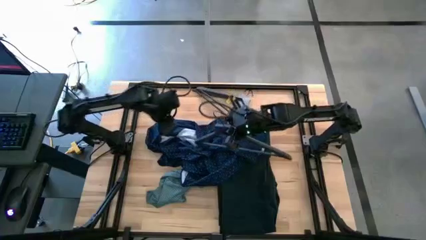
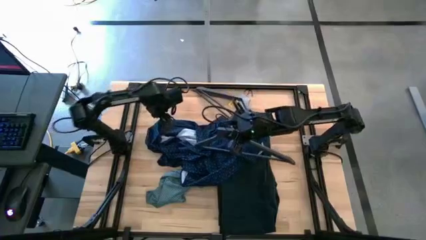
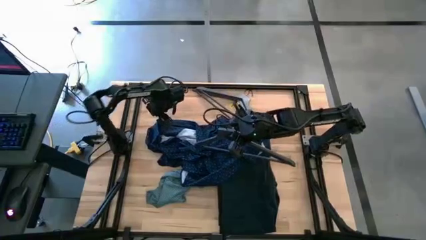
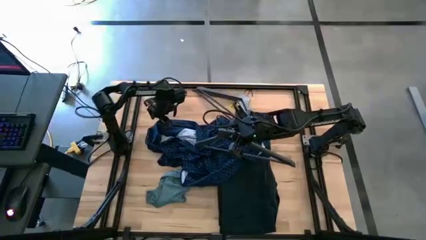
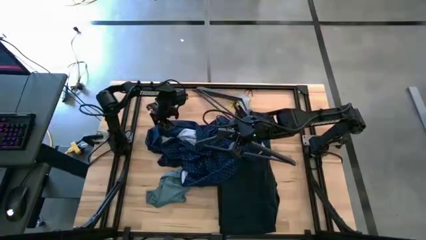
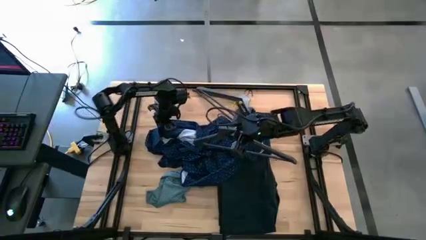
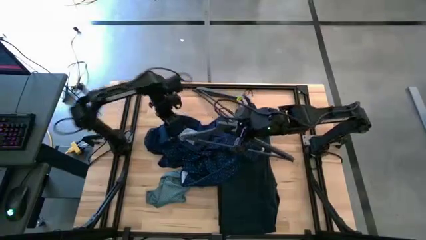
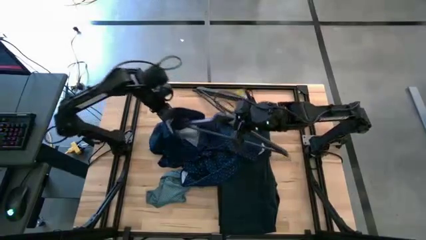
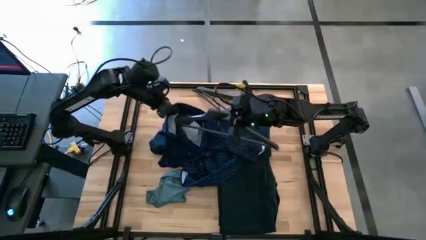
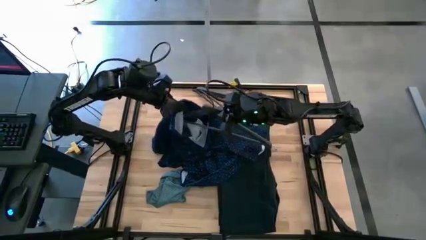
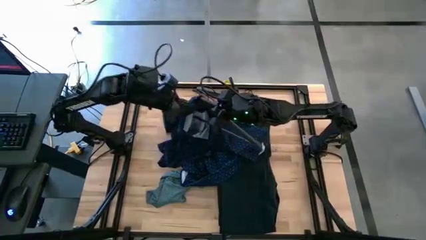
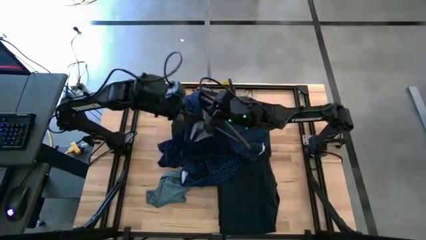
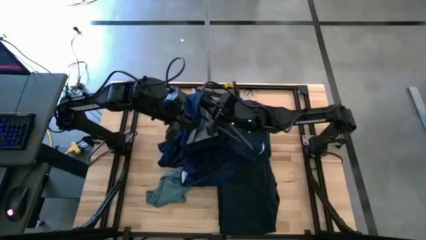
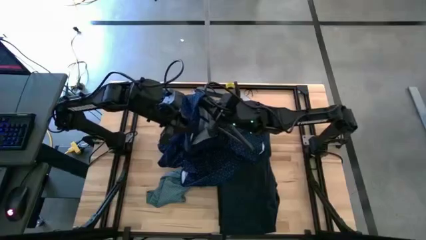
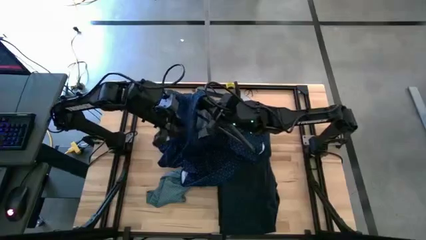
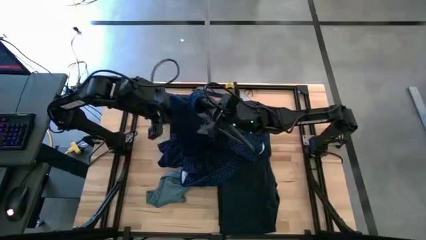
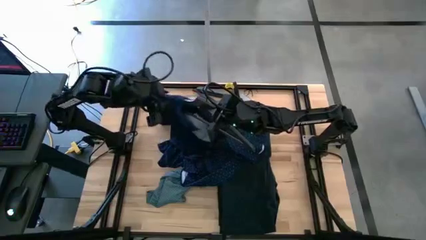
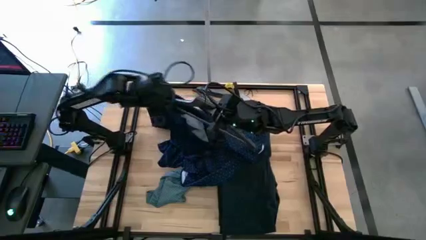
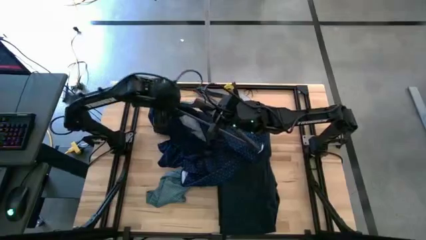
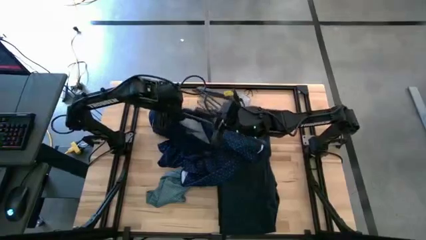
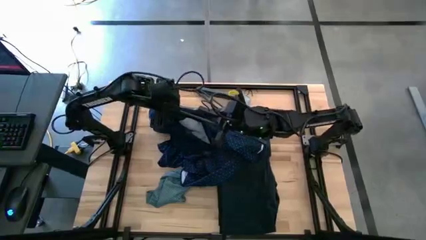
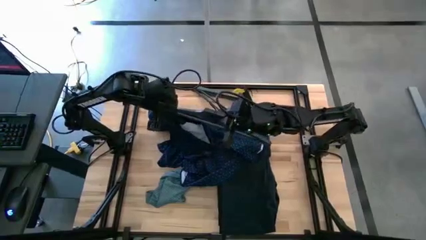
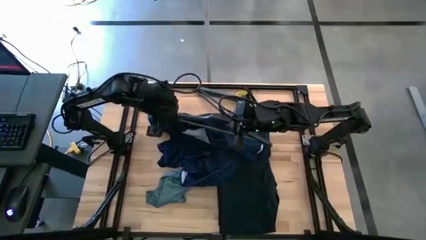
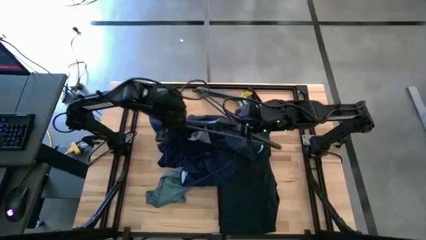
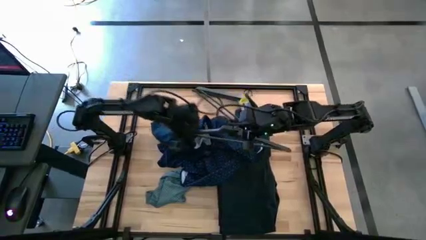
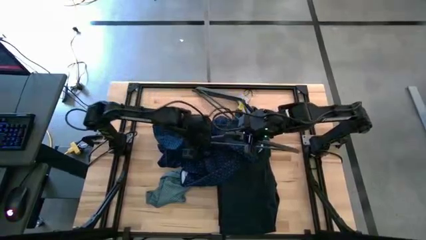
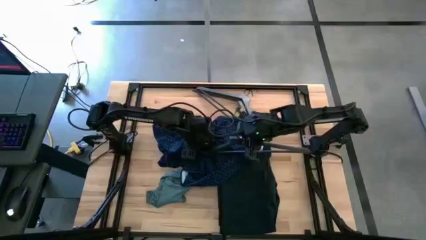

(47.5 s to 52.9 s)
Task: Hang clothes
Insert the hanger into the blue polo shirt

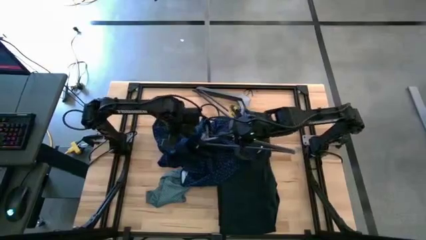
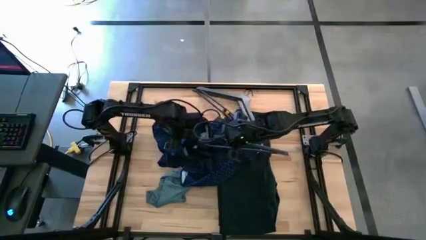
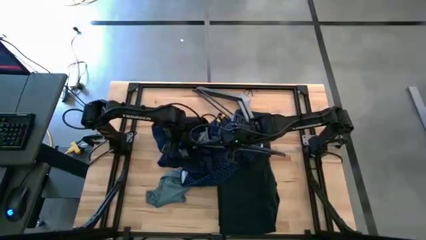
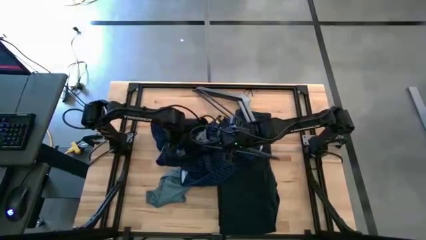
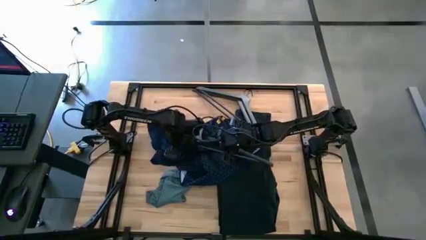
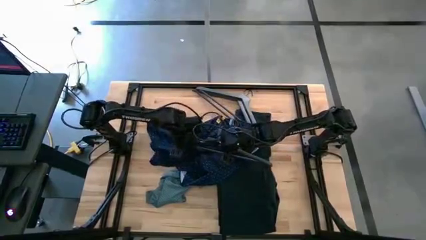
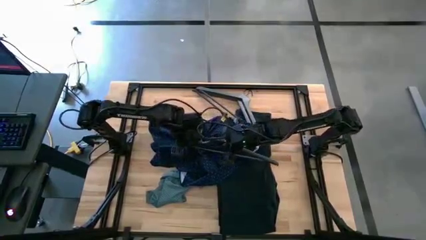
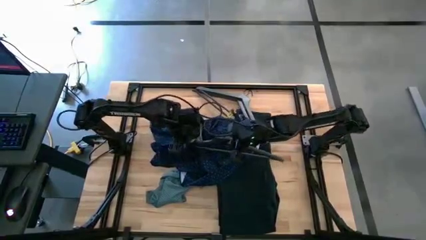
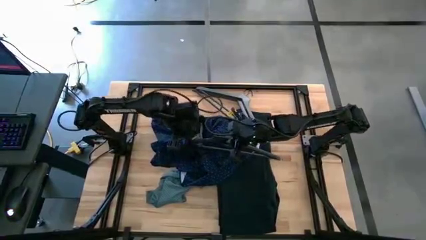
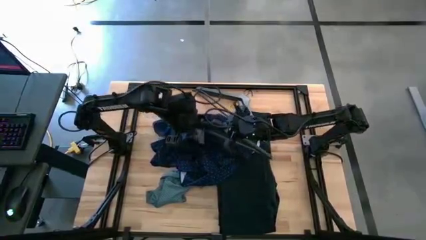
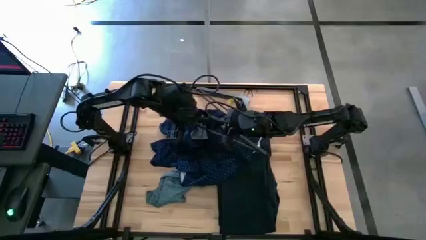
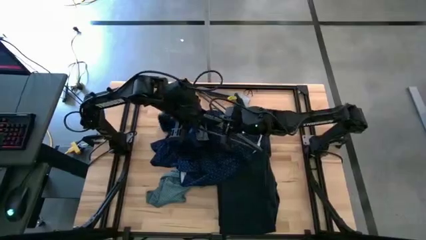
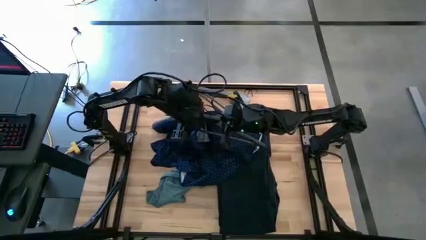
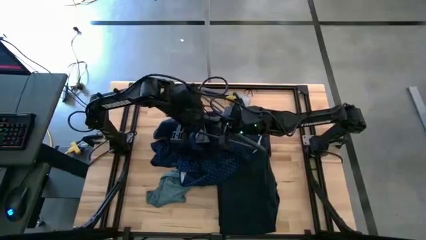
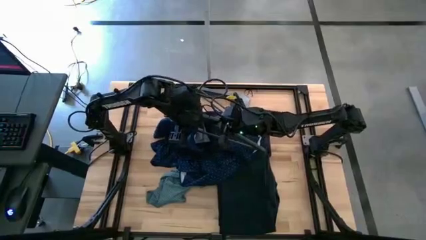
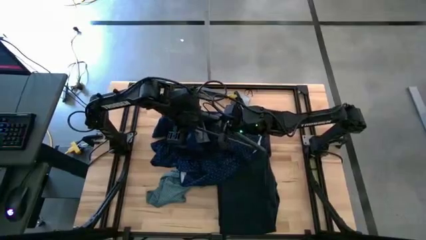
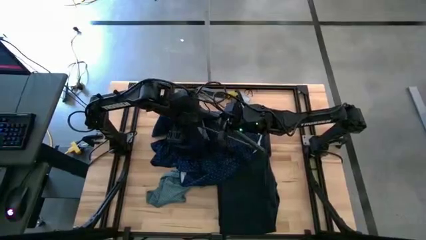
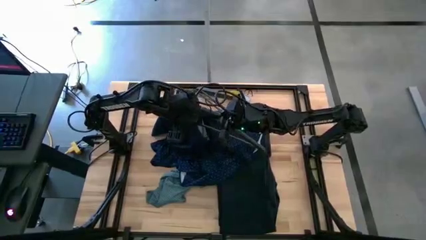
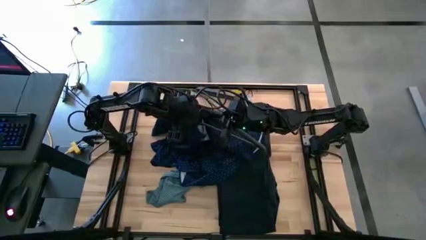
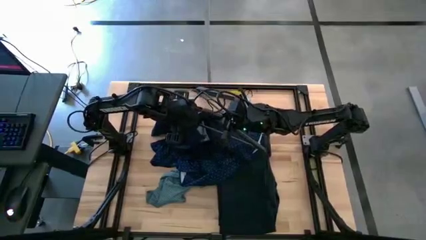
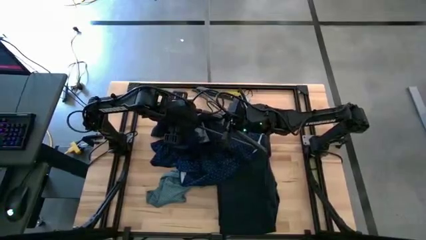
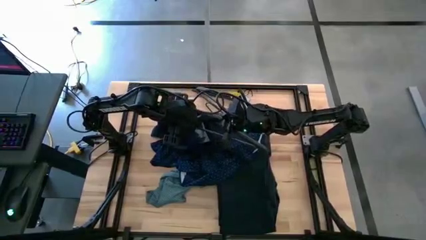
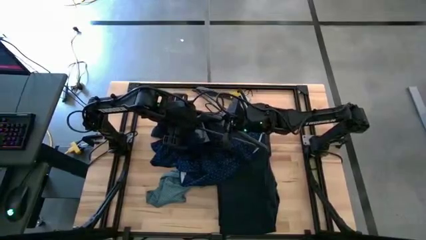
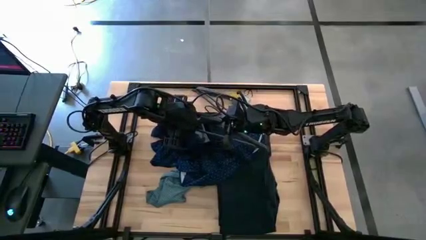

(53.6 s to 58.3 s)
Insert the hanger into the blue polo shirt
